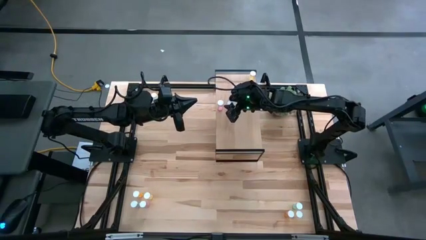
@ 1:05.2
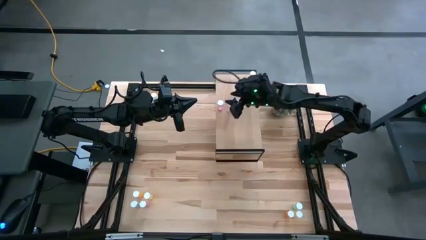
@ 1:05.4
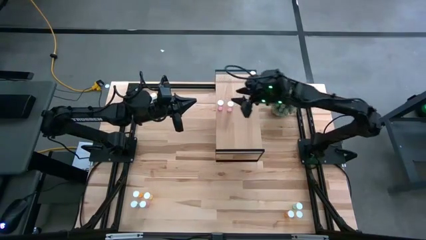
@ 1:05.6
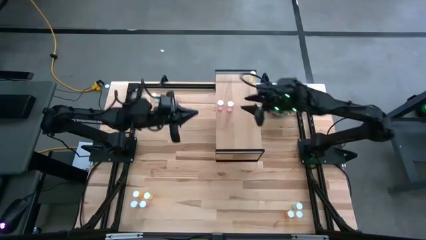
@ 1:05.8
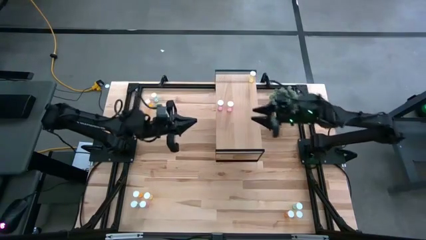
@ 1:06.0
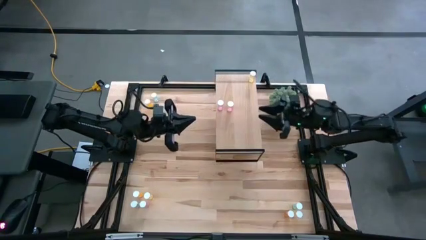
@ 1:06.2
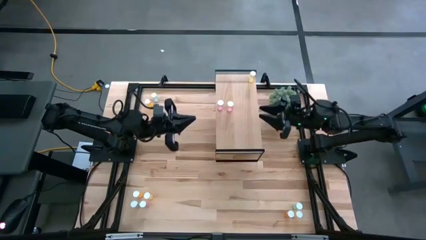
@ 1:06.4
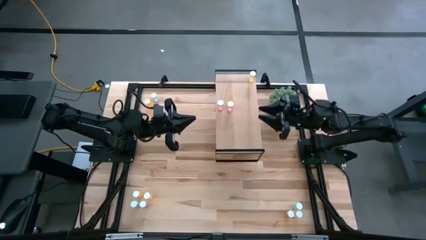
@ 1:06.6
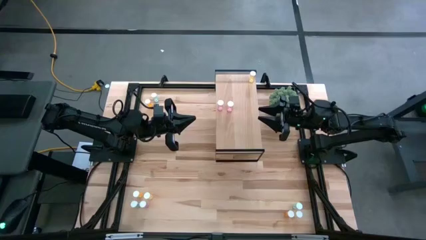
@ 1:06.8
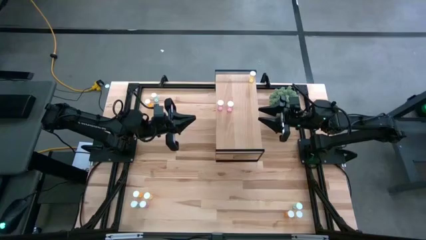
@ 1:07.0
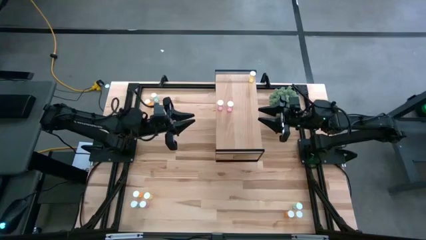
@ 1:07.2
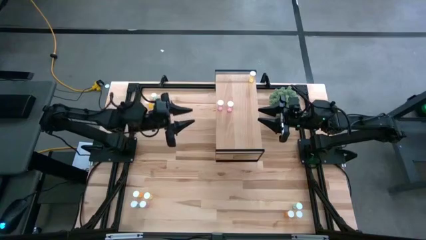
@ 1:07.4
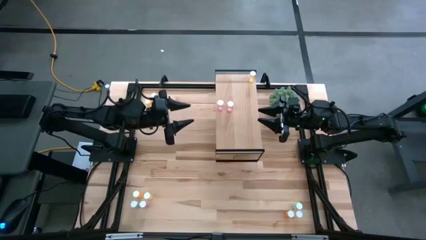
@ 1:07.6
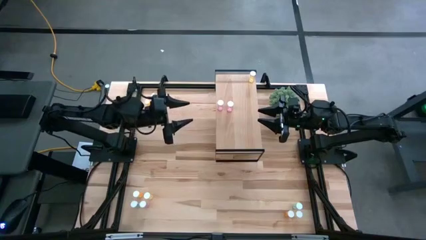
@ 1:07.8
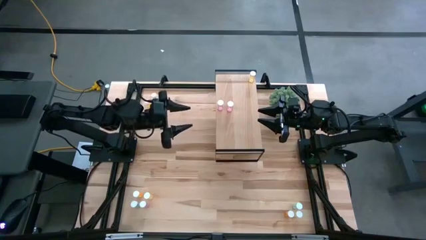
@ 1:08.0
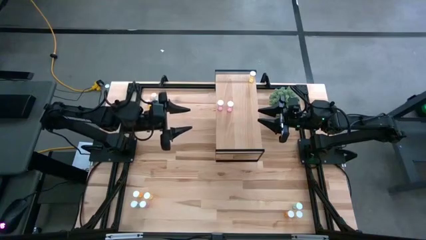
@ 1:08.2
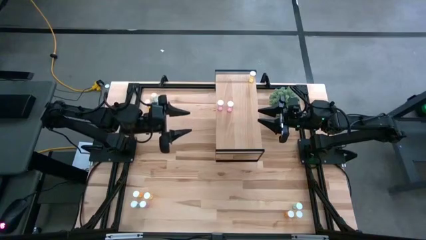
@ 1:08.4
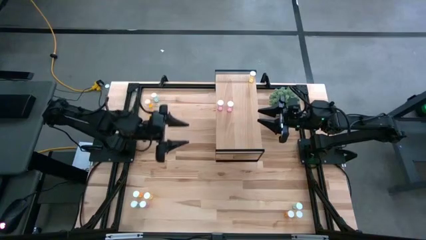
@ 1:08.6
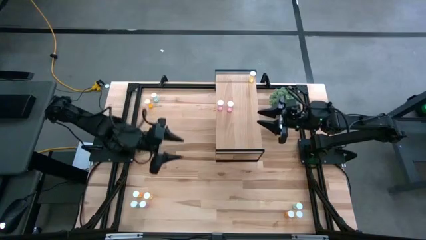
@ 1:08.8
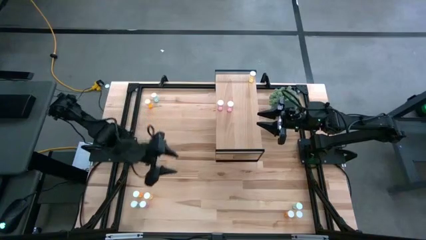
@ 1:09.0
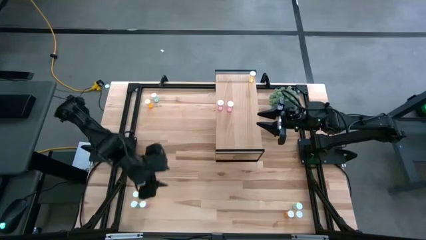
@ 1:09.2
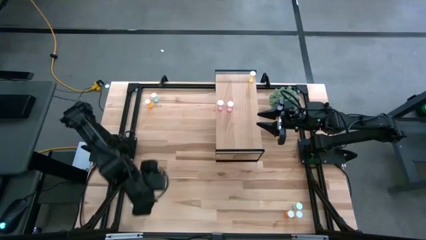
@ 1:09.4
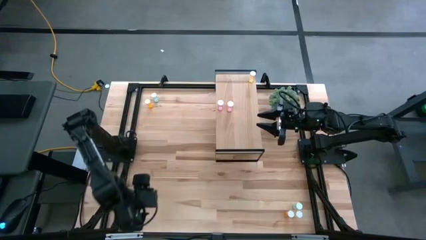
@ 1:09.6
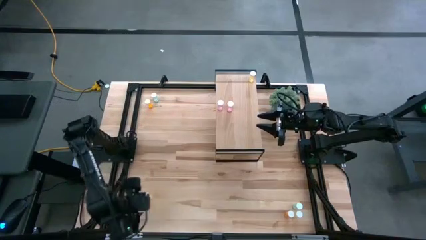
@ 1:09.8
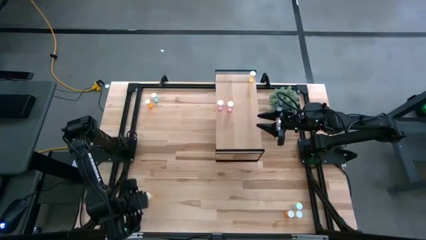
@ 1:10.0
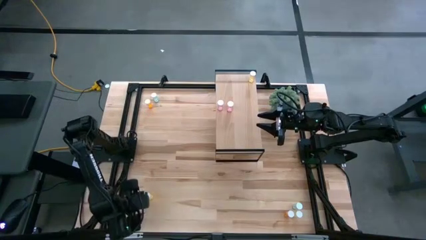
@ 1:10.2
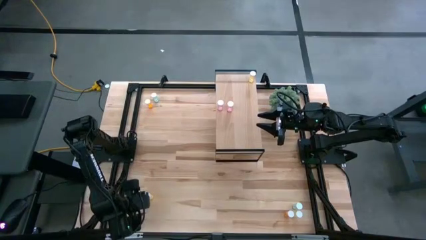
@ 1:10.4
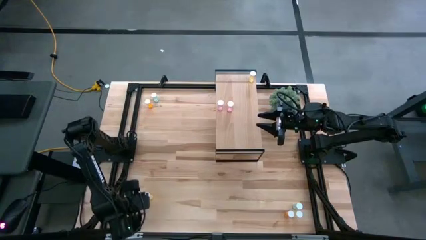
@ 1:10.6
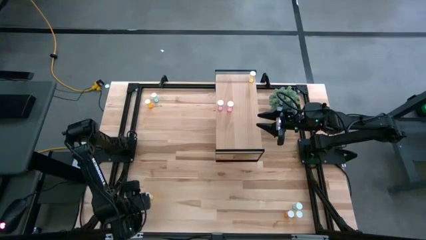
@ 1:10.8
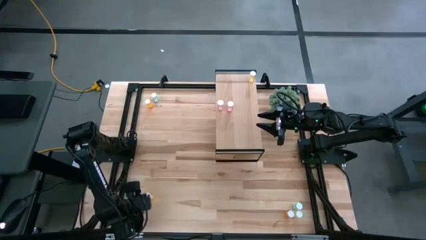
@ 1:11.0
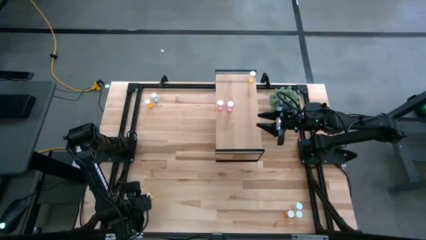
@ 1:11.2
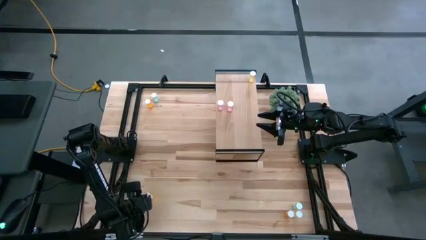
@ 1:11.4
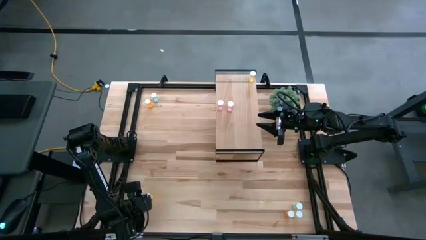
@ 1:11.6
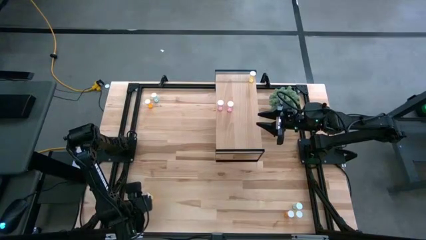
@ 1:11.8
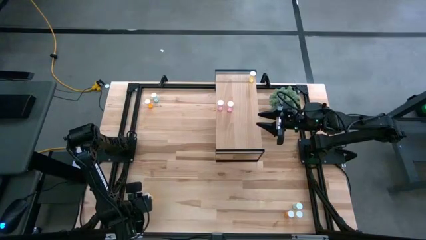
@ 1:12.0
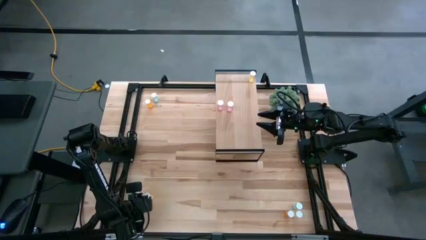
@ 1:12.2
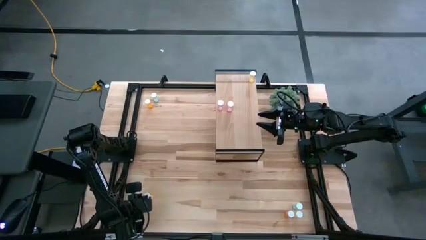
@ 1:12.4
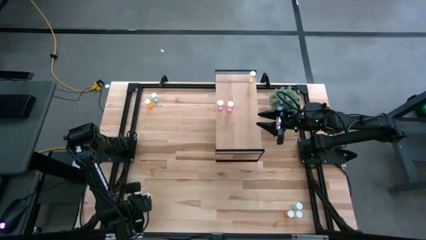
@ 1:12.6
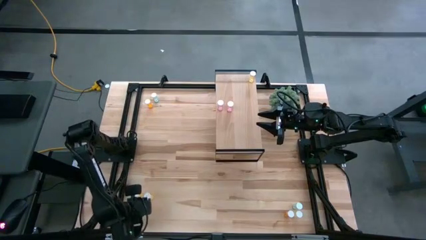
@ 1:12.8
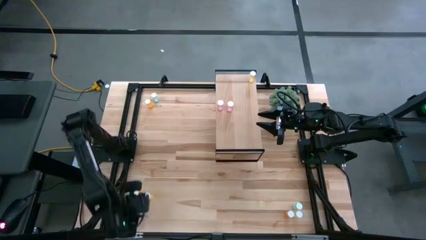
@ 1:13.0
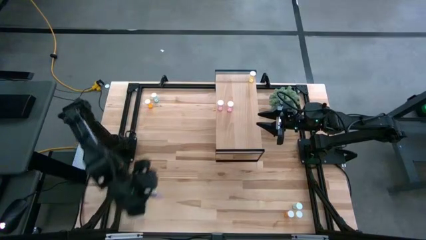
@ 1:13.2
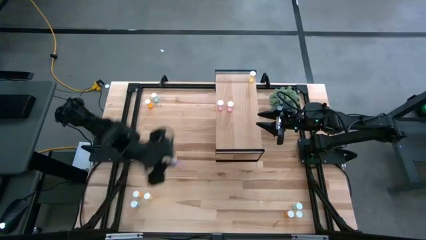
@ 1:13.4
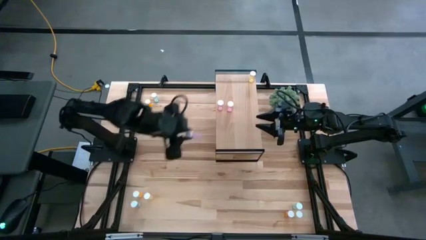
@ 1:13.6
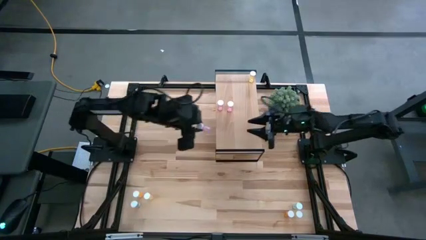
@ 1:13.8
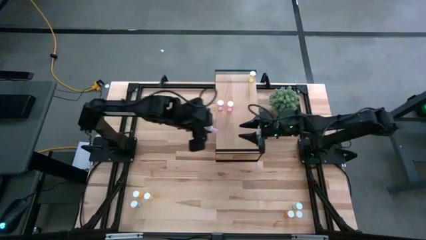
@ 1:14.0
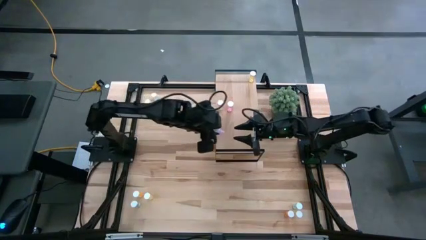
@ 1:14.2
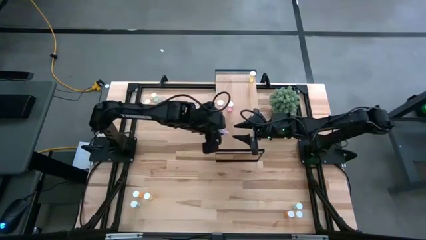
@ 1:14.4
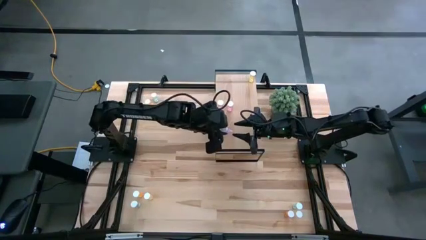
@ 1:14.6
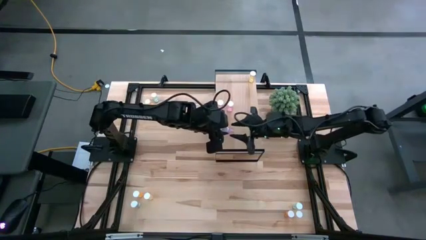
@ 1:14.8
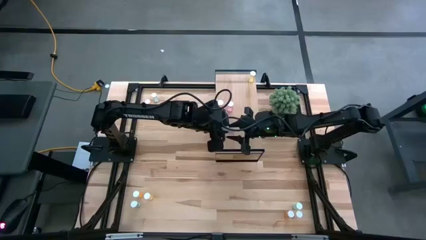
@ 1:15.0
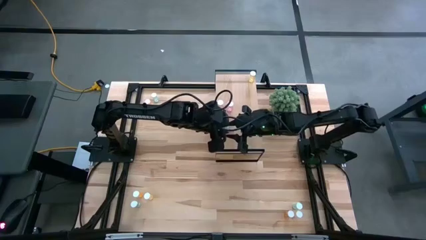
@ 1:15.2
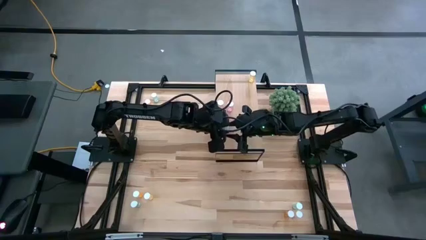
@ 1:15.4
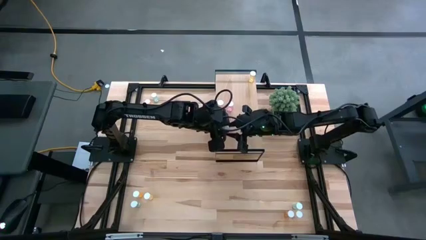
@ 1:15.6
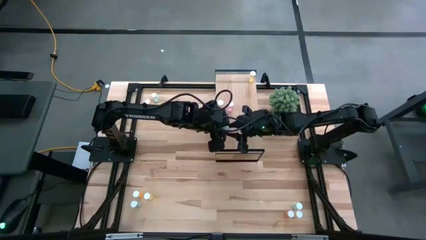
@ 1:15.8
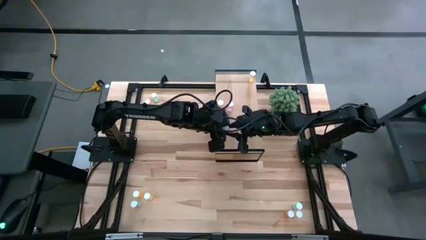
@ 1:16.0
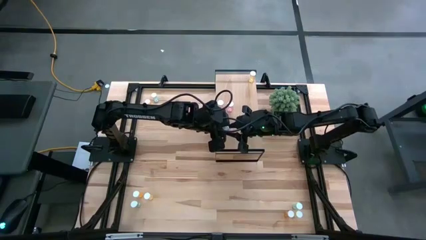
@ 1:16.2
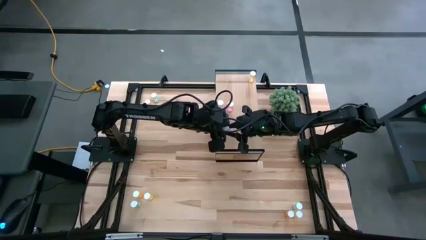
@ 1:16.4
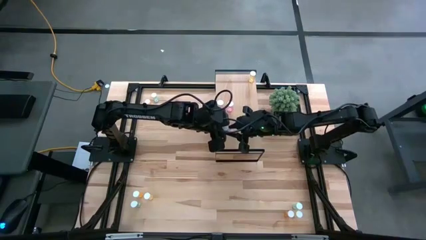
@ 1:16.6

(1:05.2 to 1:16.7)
Task: Pick and place medicine bottles onto shelf by color
Put the pink pill bottle on the shelf aligned with the other pink pill bottles

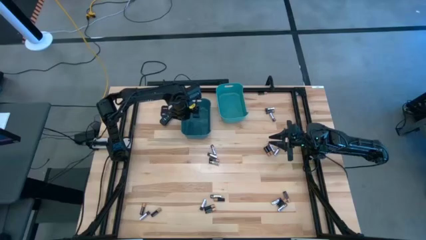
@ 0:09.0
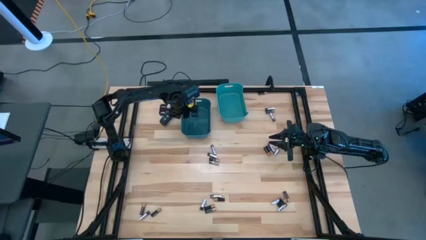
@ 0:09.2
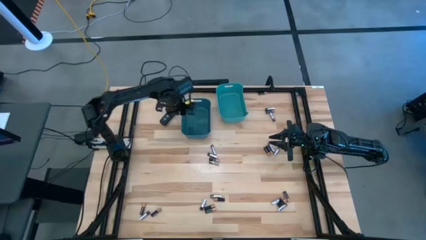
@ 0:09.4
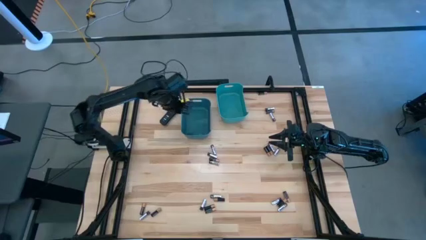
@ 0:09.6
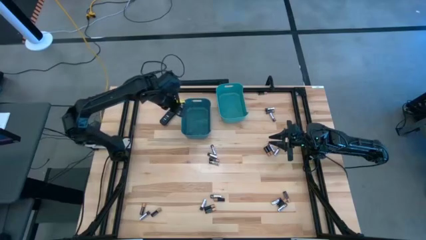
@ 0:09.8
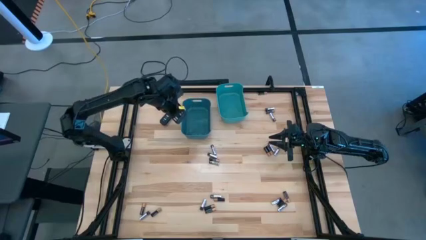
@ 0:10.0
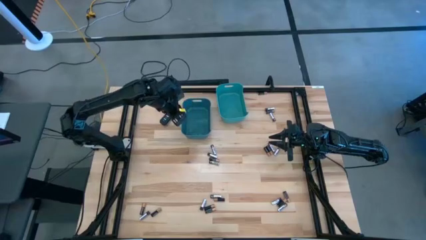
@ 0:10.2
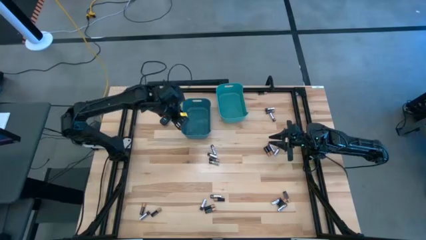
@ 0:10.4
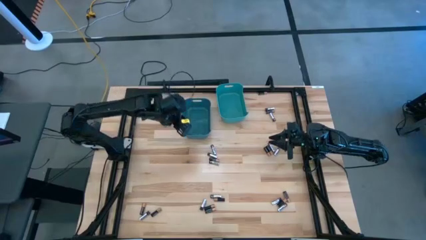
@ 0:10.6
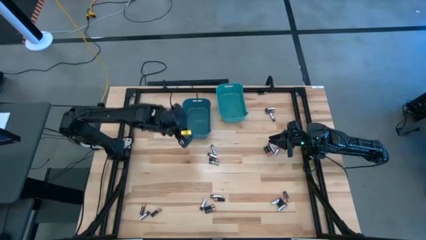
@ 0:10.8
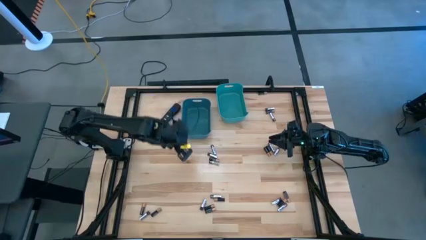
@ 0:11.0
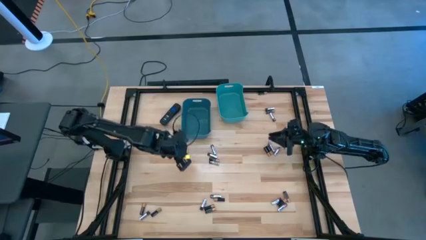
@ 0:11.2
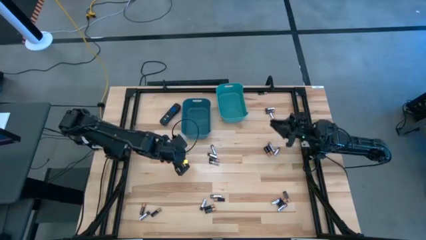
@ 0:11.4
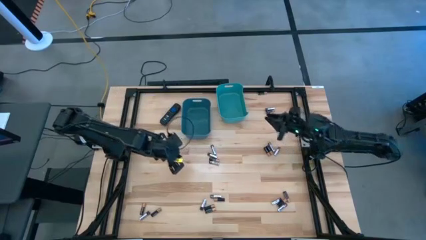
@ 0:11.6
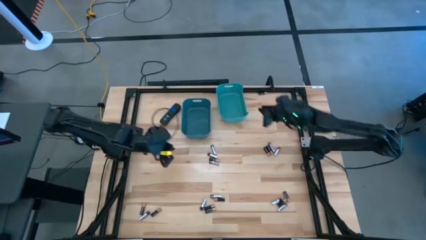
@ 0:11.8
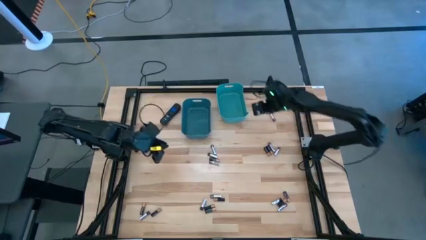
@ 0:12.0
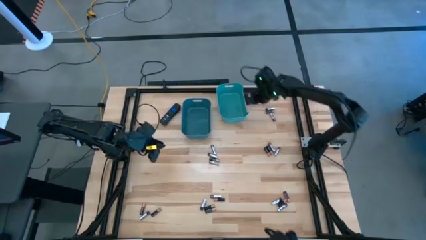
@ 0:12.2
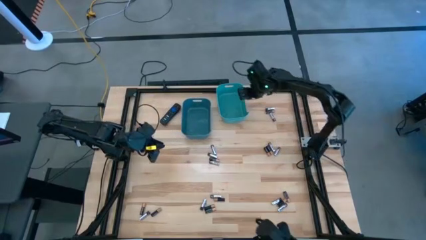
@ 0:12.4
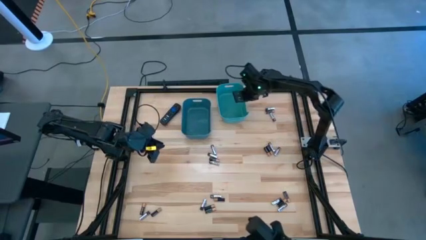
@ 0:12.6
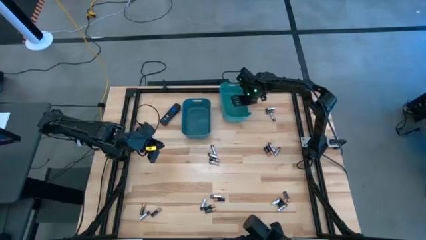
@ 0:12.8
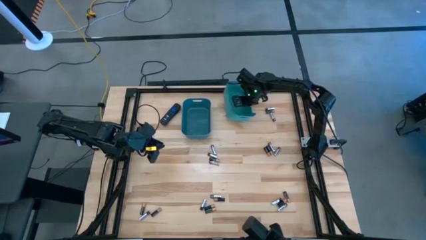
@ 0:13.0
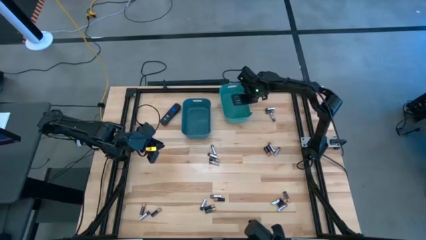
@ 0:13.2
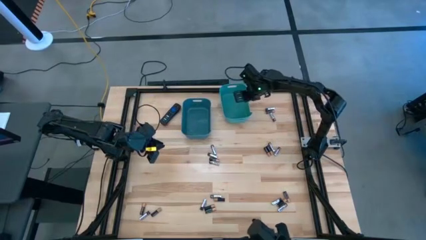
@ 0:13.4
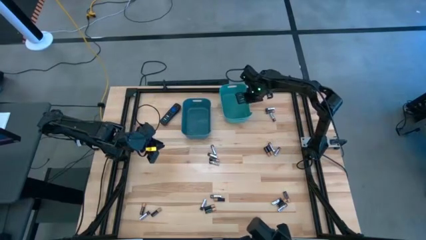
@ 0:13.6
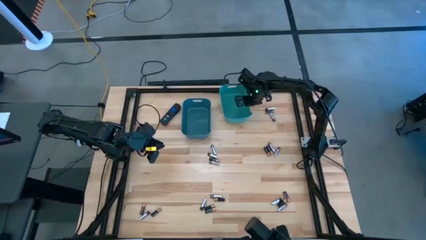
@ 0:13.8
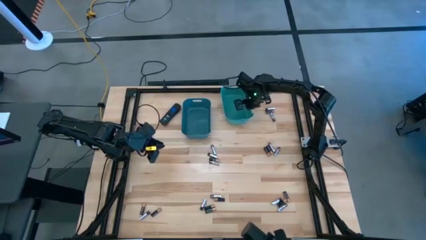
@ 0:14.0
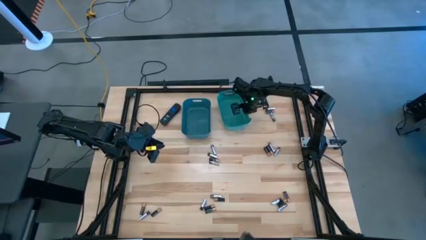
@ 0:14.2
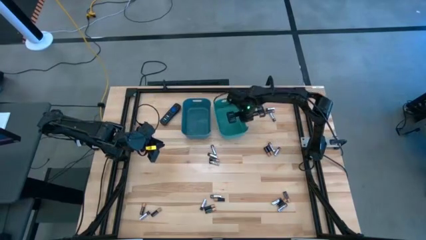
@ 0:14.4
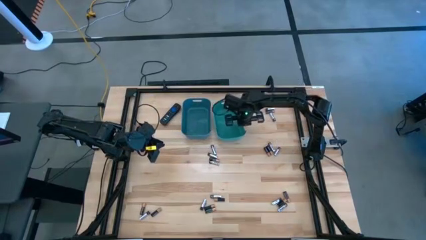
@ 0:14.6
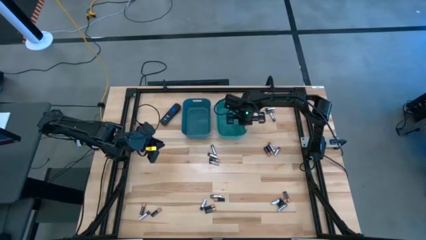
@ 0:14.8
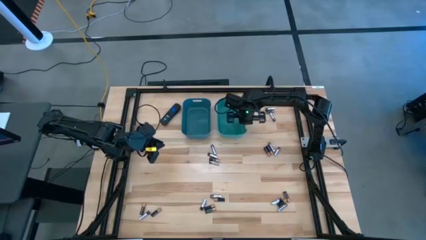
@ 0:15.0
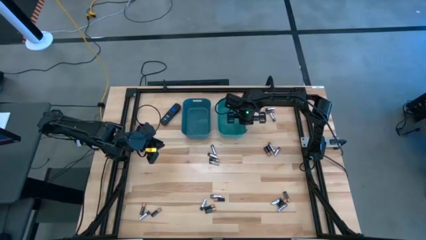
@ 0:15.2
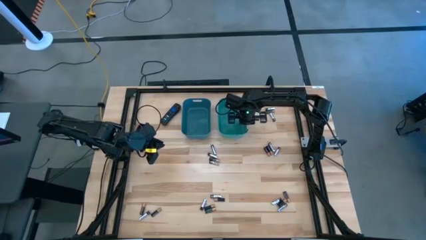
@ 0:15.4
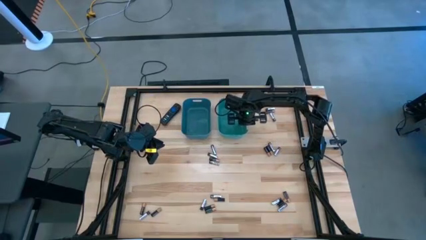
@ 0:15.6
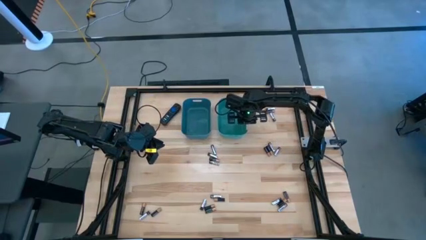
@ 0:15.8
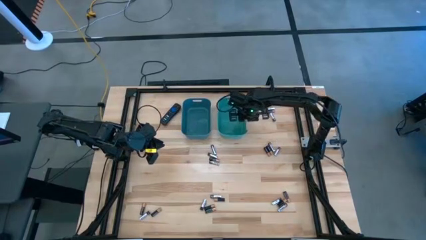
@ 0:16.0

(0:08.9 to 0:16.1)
Task: Sort batteries
Move the bin to the middle top
